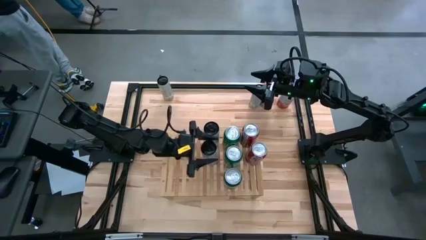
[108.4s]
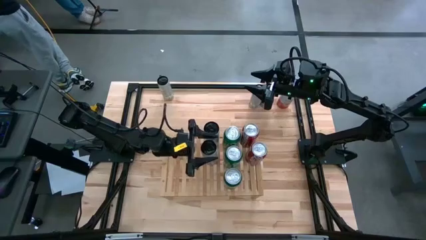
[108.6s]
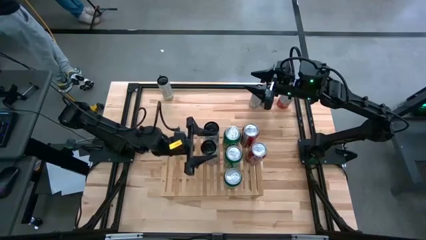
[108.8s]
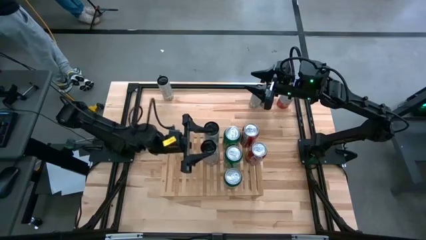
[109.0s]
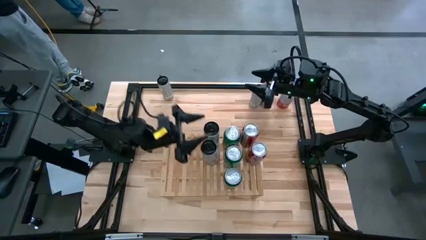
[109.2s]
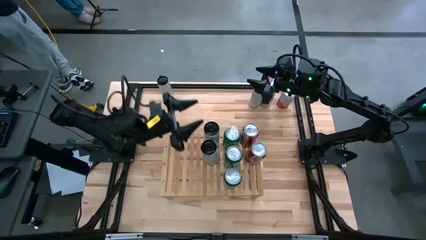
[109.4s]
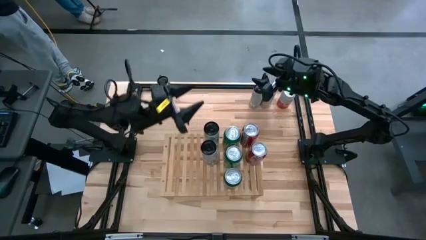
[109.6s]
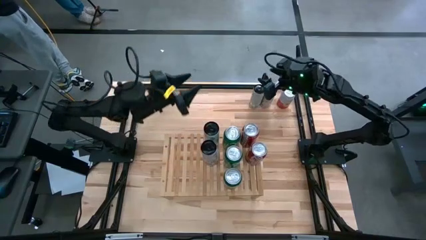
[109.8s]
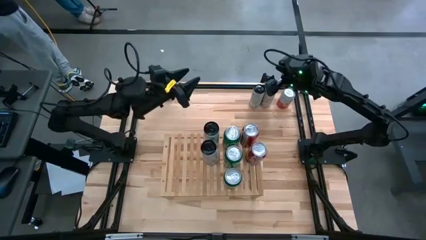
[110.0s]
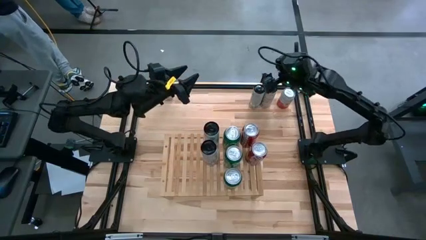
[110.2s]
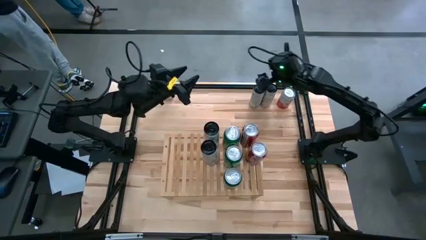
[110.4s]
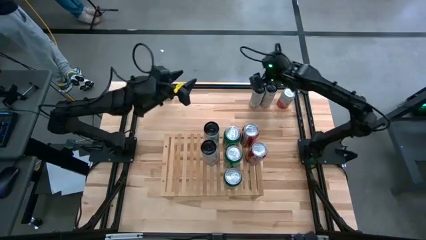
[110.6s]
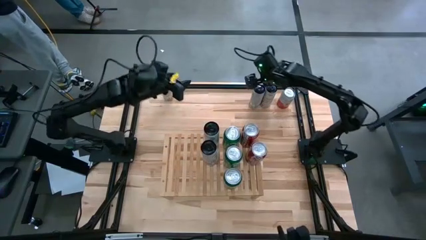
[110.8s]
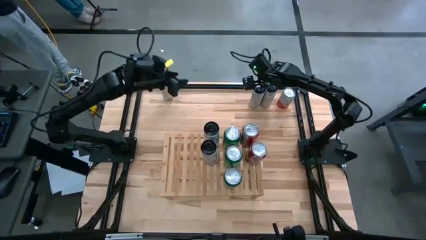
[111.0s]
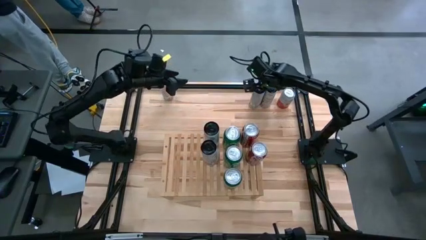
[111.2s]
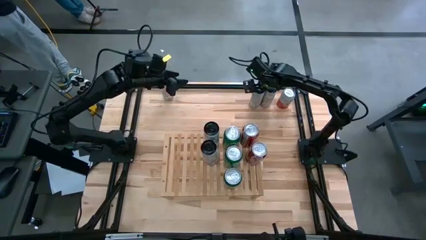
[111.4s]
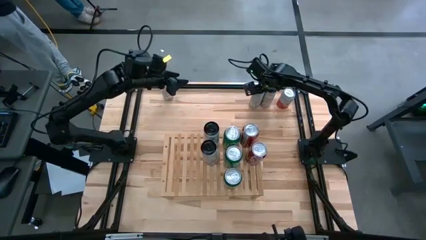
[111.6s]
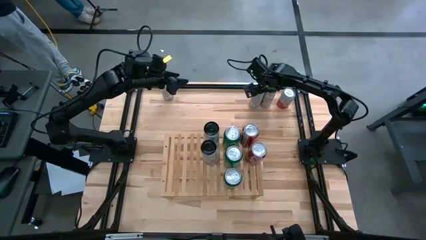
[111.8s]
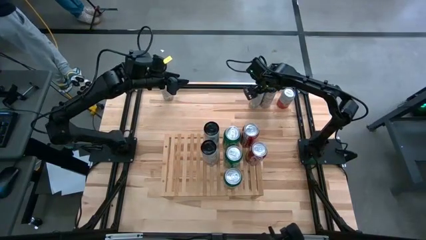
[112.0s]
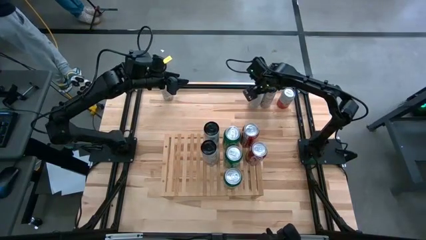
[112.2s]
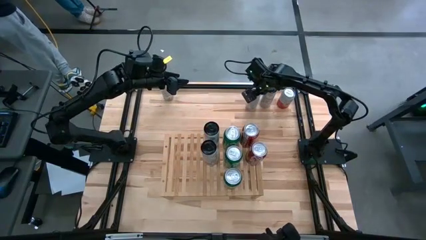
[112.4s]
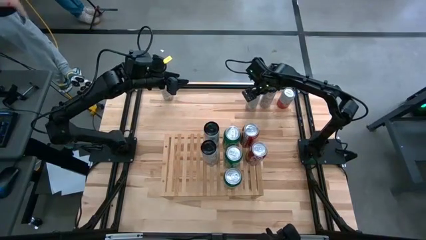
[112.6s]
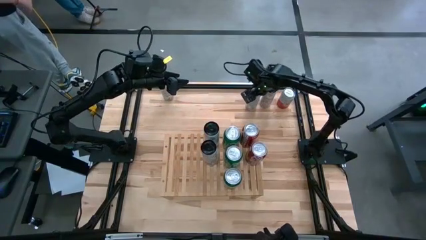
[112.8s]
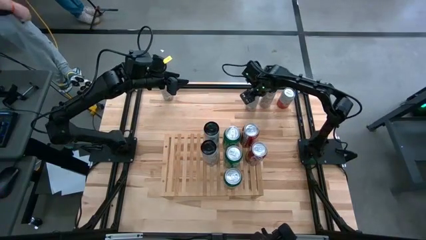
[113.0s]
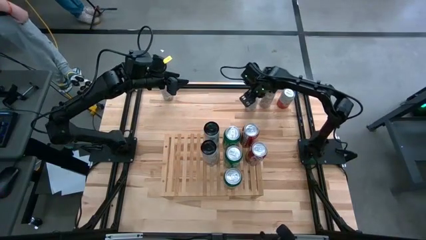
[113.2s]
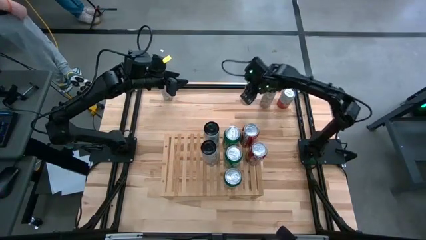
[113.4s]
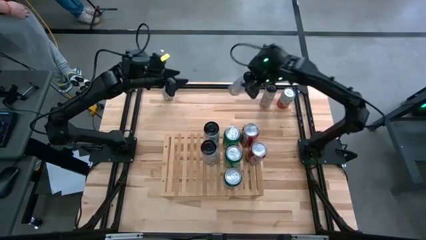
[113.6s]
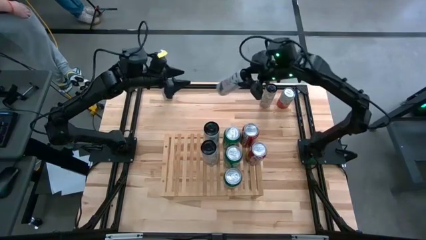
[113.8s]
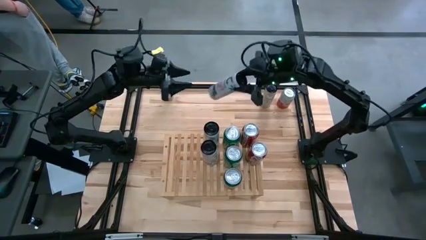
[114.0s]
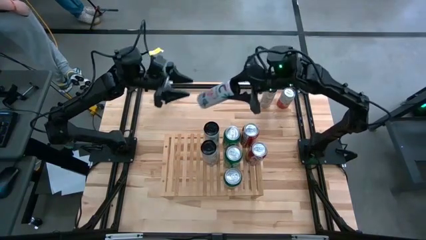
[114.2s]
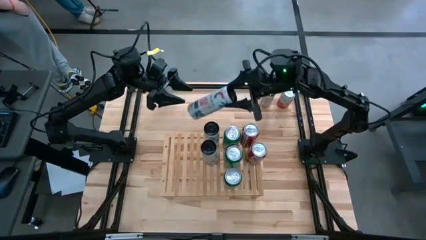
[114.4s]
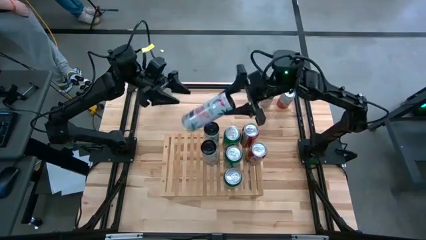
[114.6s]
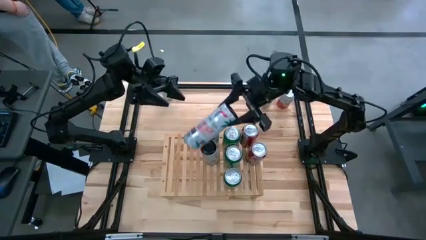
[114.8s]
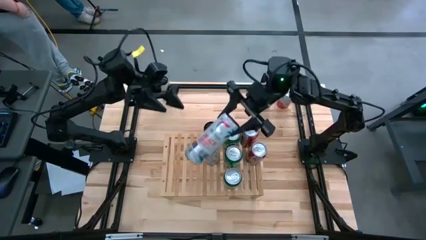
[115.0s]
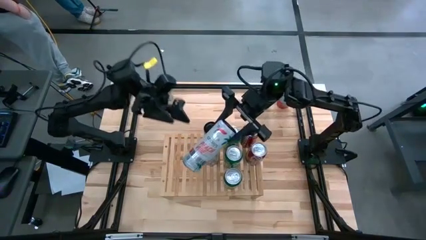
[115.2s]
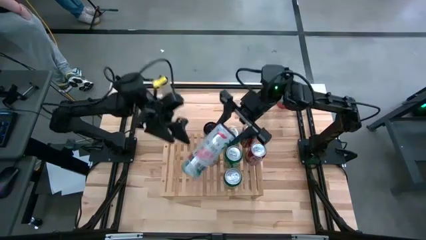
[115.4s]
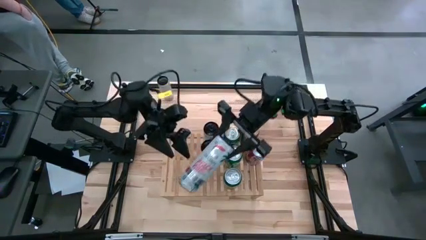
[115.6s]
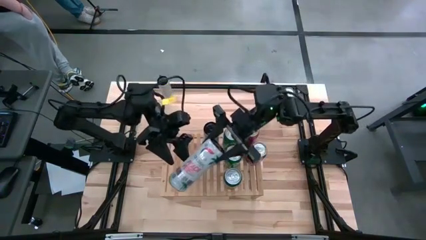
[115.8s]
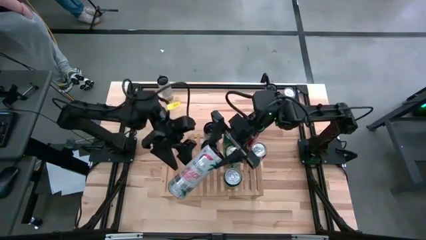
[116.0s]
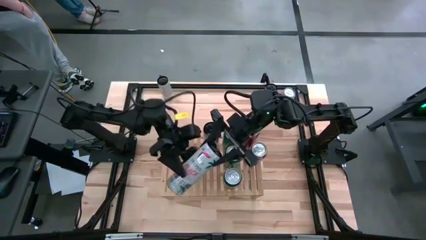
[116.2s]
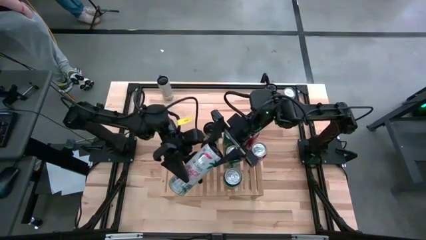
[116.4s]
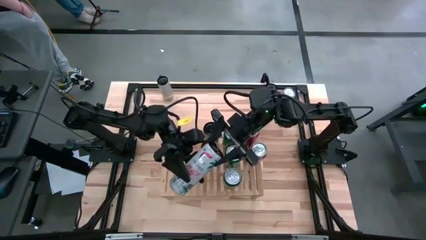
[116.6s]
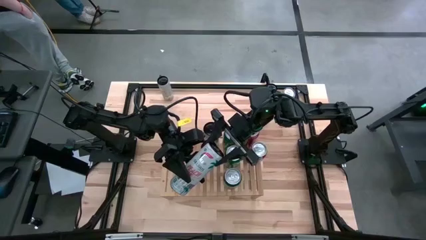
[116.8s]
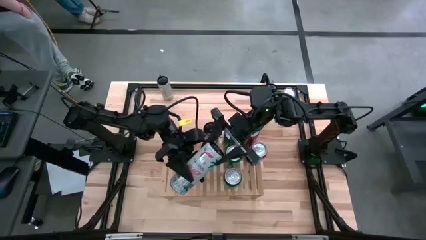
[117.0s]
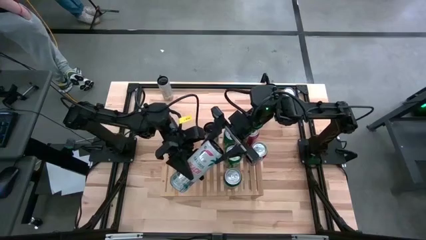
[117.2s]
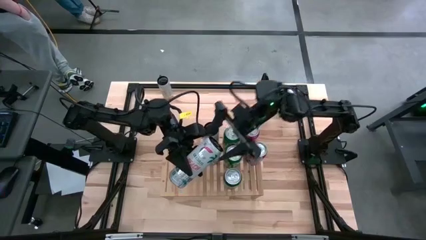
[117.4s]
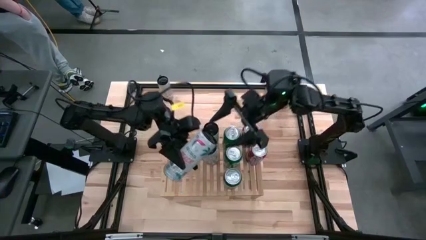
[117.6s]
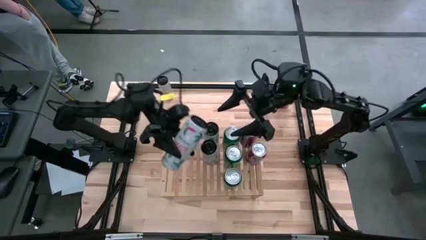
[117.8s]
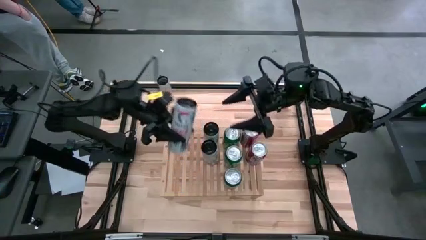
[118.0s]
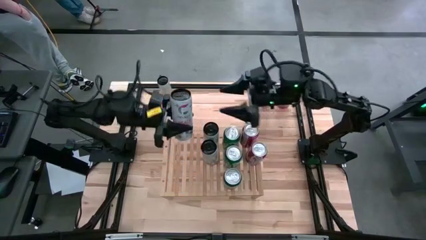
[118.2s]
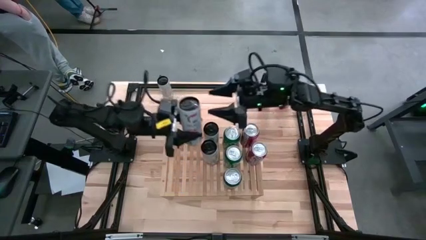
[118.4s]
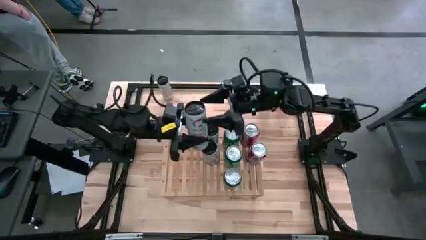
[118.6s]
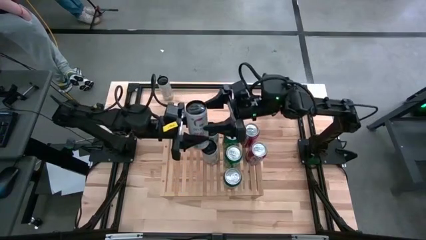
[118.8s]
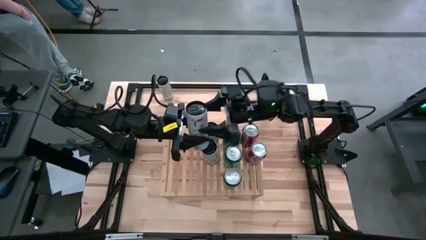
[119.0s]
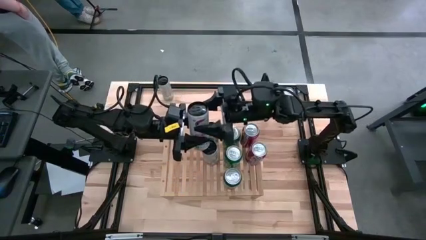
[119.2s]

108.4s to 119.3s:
Task: Place canned beverage on shelf
Put the white-pink soda can on the shelf aligned with the other white-pink soda cans

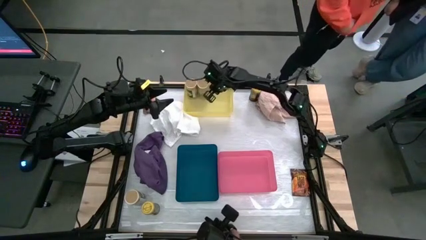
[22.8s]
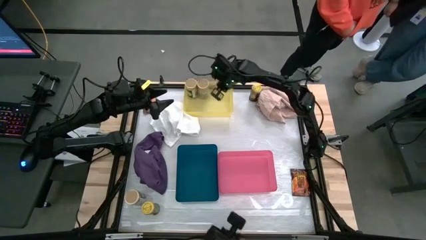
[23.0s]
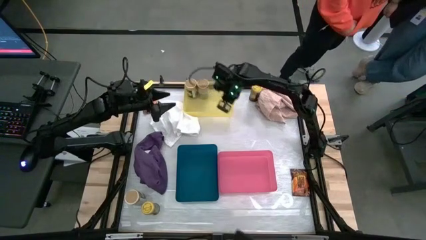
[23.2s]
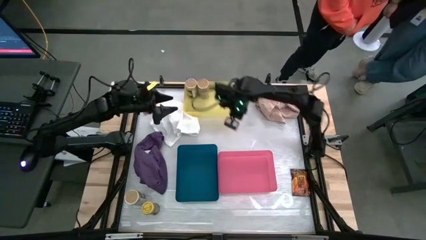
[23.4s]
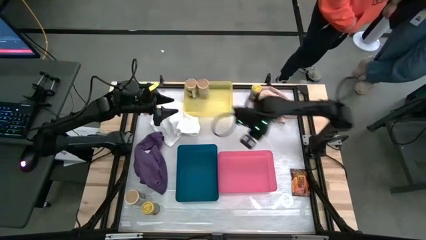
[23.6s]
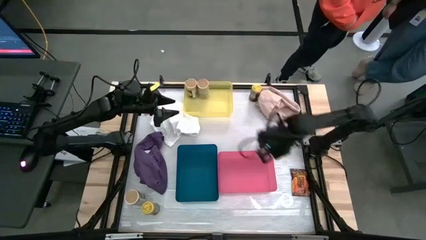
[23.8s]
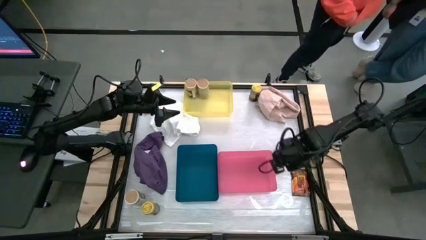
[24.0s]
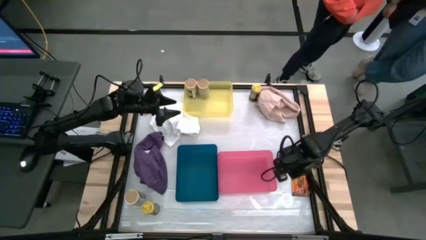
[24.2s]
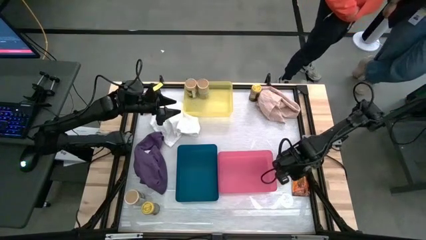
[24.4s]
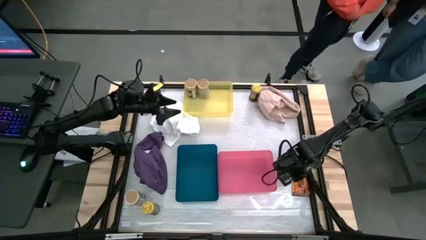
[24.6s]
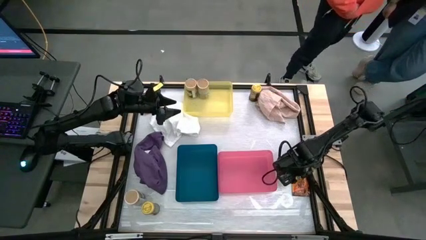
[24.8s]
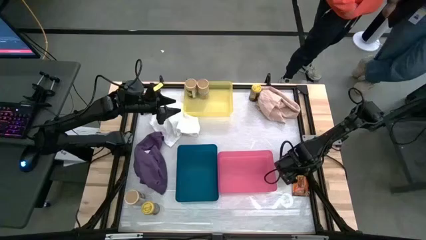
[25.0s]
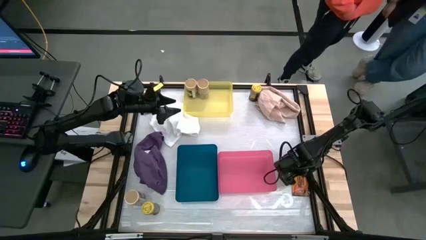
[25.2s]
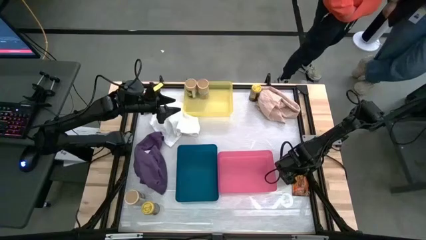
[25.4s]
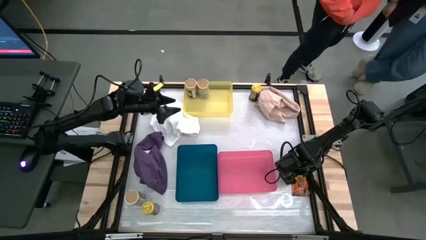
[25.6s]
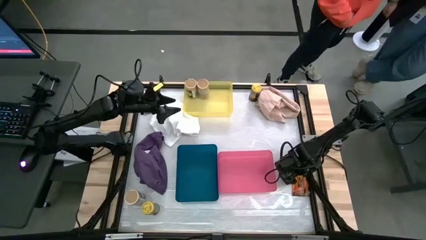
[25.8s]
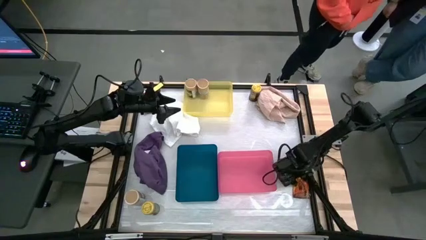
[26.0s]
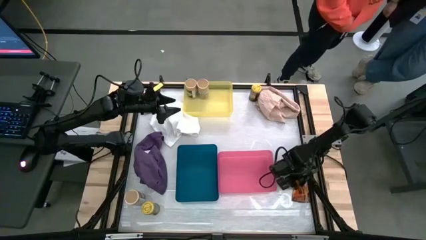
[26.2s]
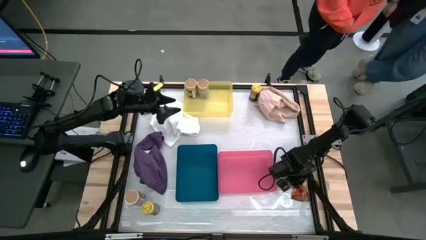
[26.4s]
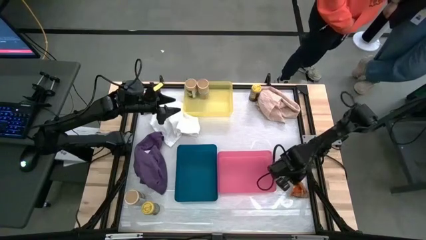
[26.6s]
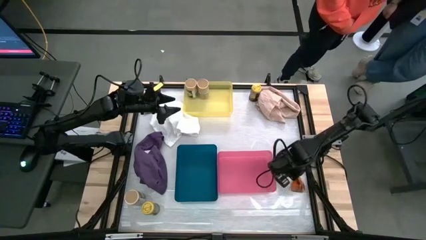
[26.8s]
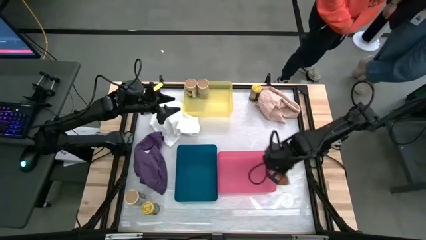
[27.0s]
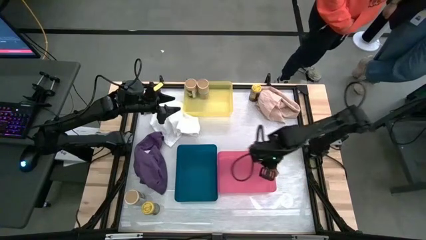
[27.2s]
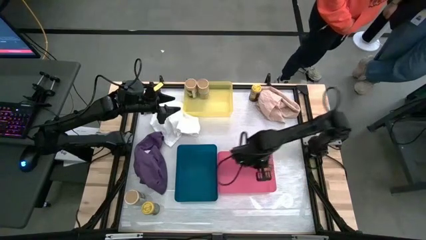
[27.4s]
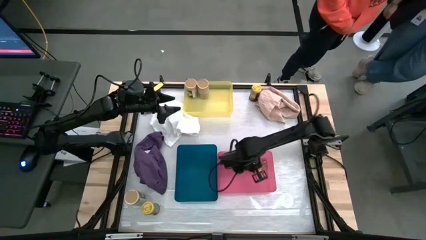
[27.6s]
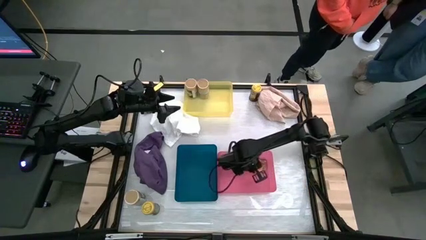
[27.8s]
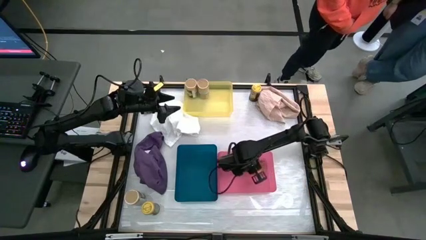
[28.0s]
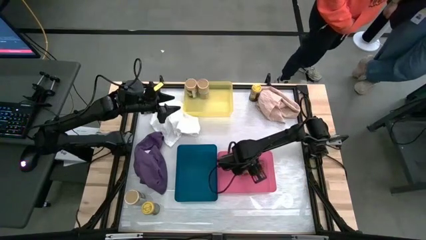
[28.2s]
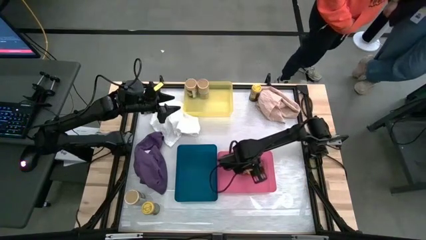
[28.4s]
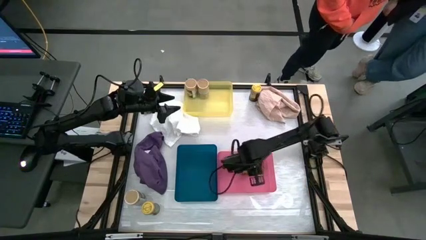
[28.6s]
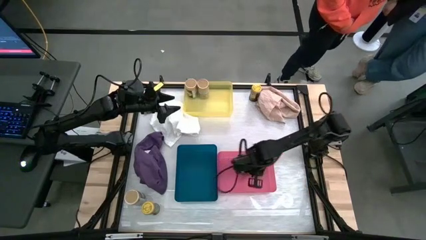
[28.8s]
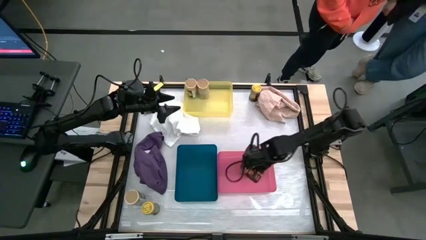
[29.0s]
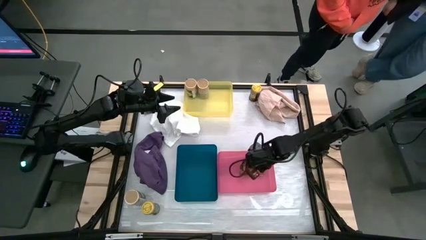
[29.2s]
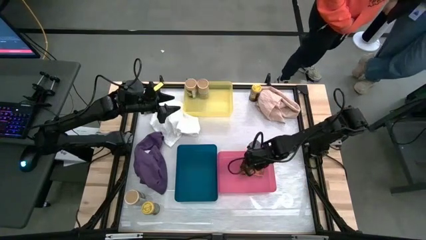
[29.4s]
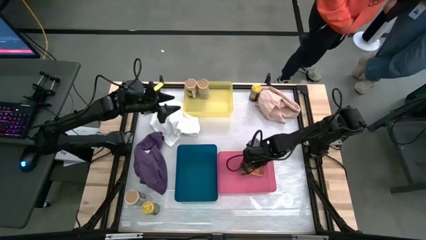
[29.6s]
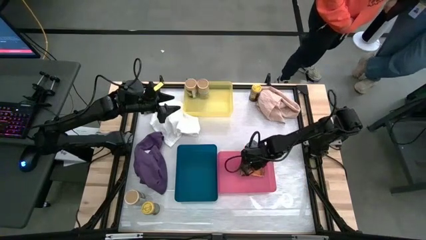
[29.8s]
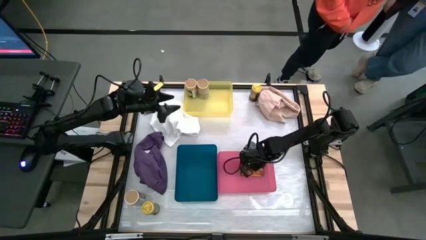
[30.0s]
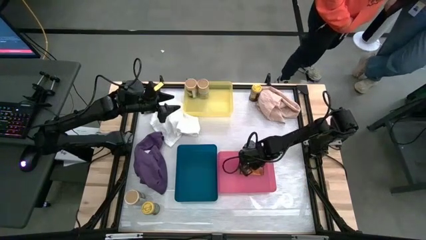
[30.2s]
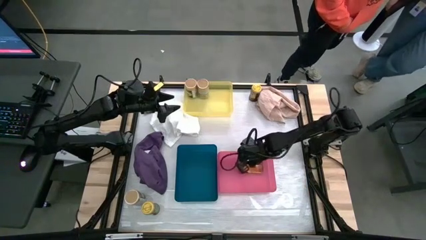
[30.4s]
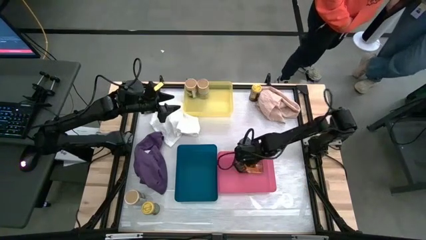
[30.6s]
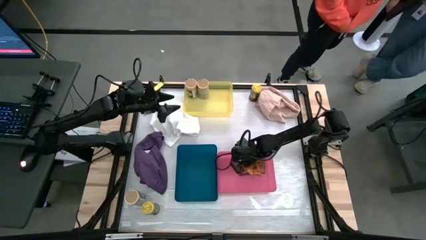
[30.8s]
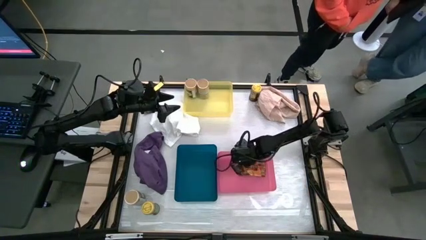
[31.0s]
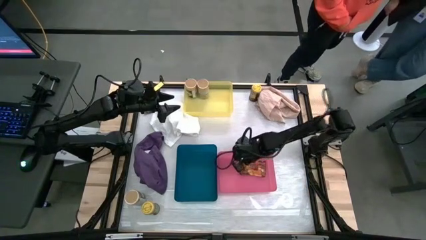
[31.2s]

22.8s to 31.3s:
Task: Sort spices by type
Put the bottom orange seasoning bag into the pink bin
